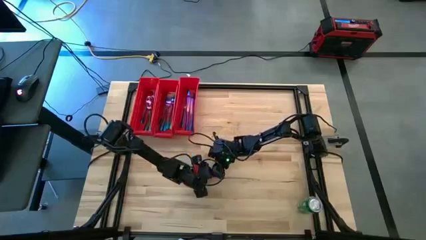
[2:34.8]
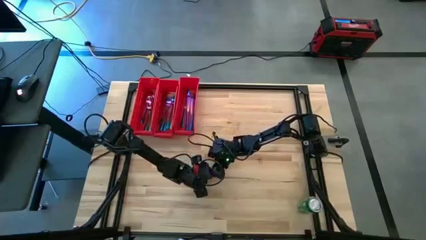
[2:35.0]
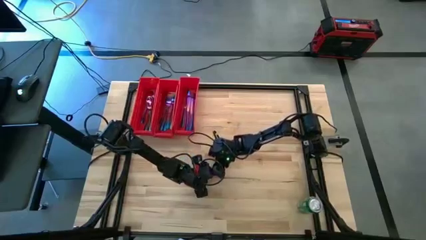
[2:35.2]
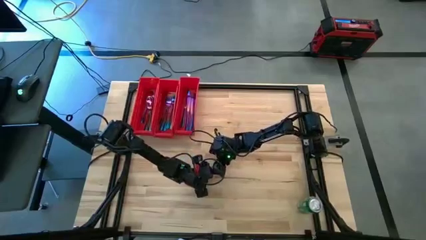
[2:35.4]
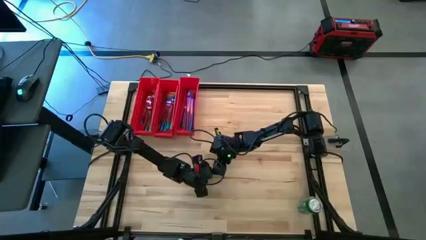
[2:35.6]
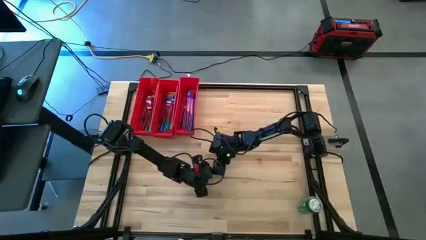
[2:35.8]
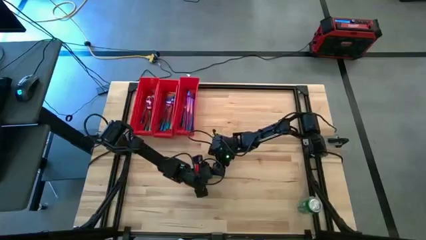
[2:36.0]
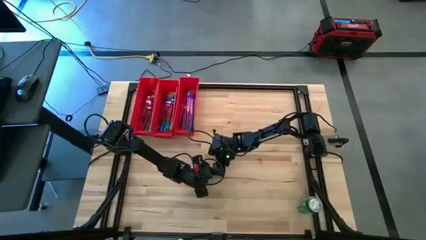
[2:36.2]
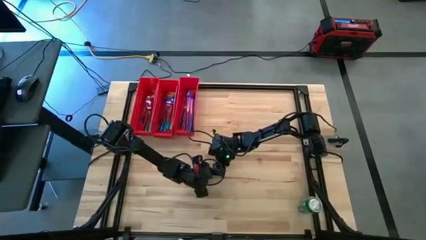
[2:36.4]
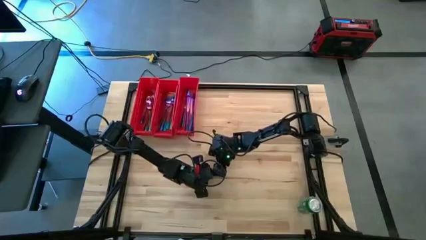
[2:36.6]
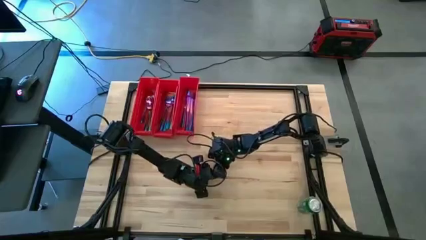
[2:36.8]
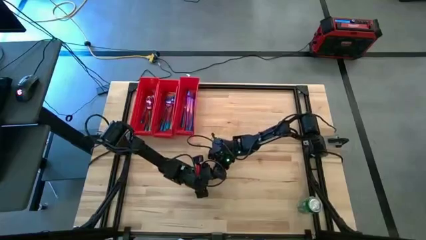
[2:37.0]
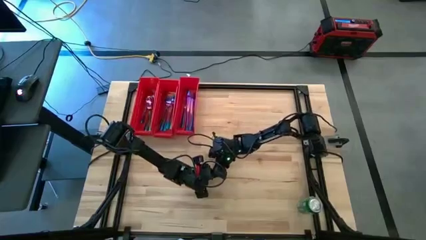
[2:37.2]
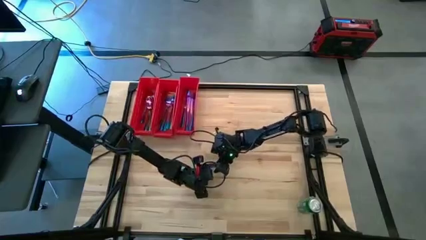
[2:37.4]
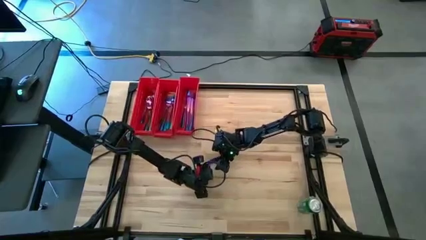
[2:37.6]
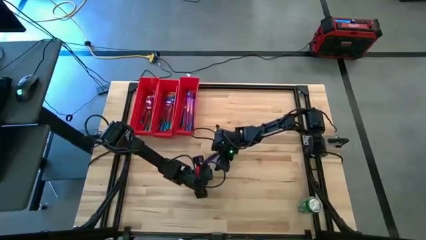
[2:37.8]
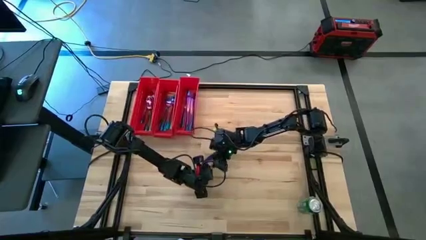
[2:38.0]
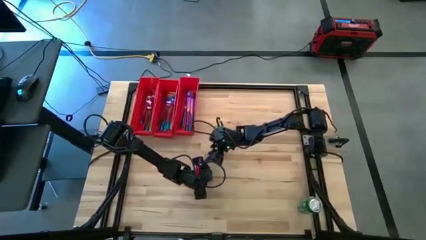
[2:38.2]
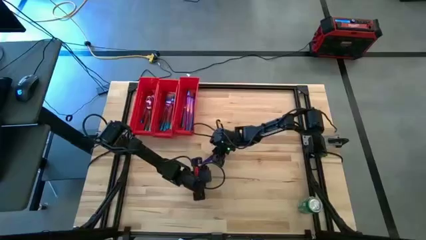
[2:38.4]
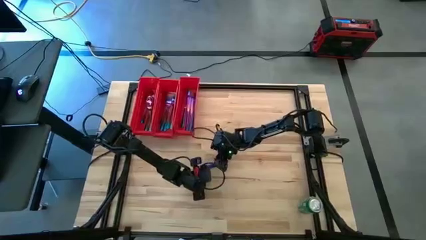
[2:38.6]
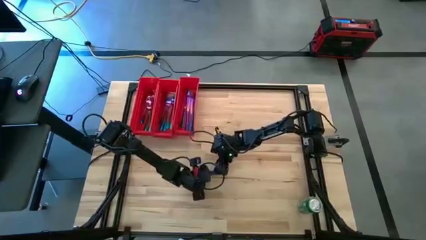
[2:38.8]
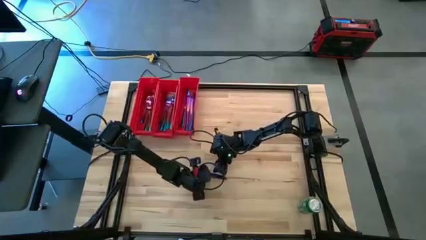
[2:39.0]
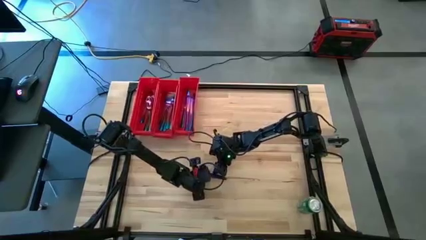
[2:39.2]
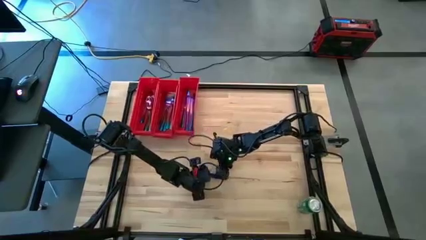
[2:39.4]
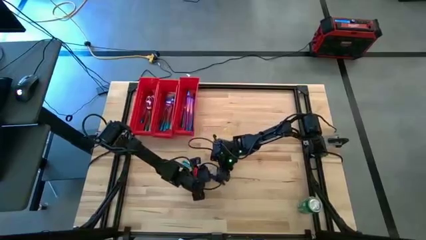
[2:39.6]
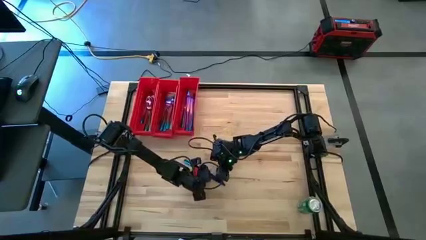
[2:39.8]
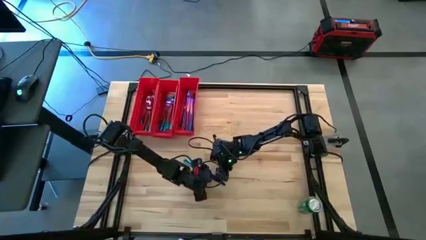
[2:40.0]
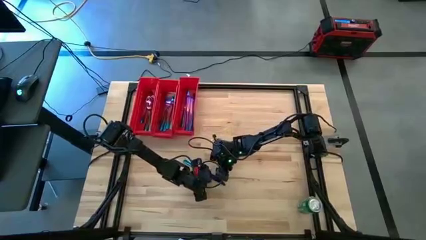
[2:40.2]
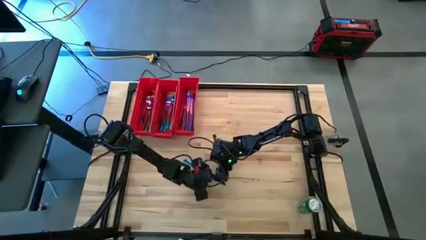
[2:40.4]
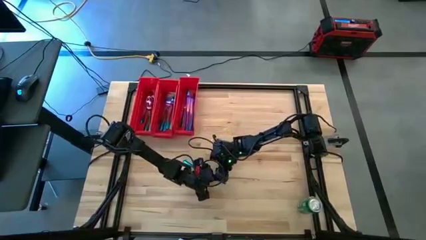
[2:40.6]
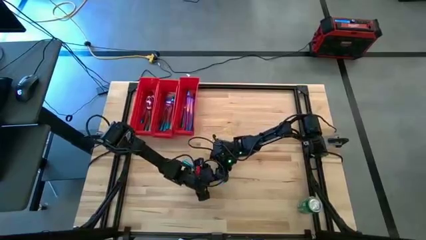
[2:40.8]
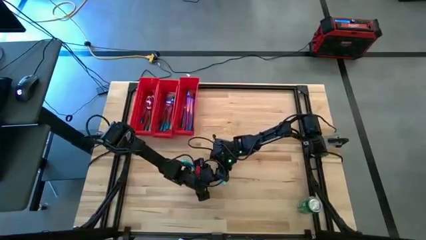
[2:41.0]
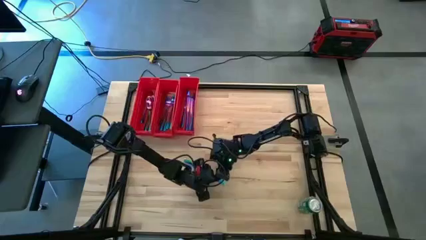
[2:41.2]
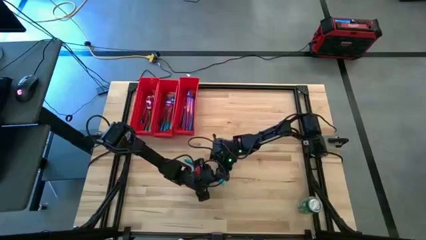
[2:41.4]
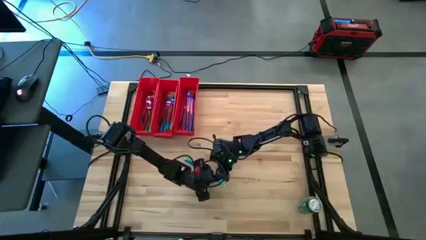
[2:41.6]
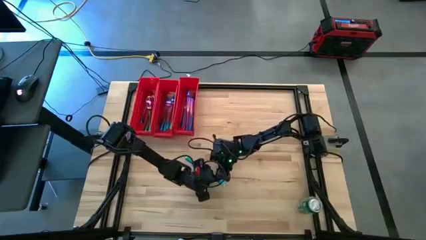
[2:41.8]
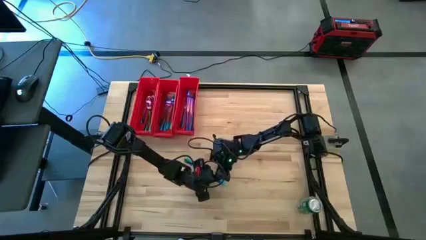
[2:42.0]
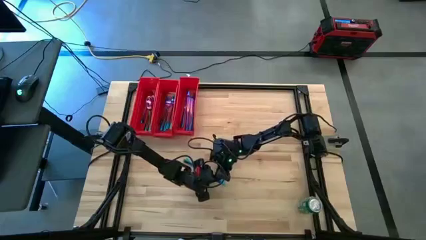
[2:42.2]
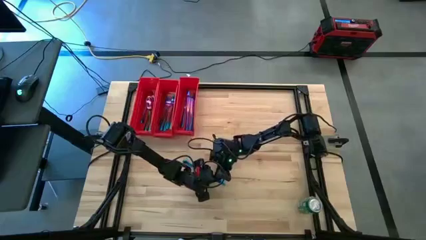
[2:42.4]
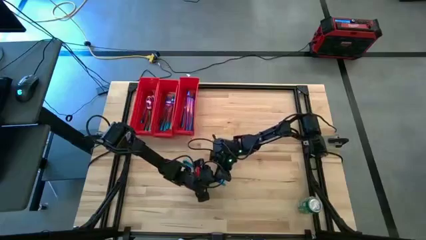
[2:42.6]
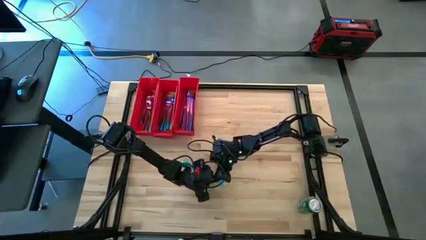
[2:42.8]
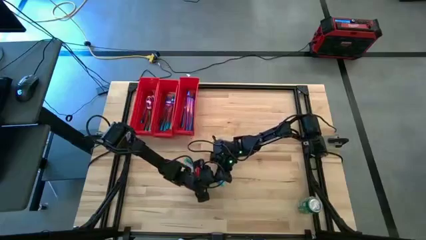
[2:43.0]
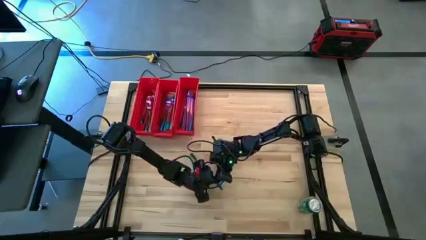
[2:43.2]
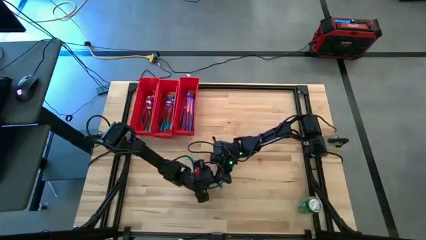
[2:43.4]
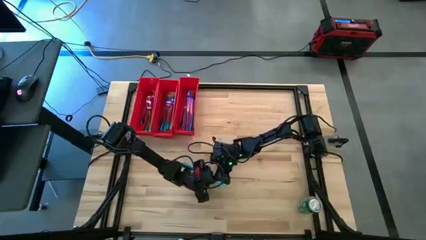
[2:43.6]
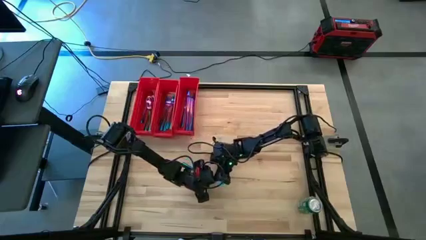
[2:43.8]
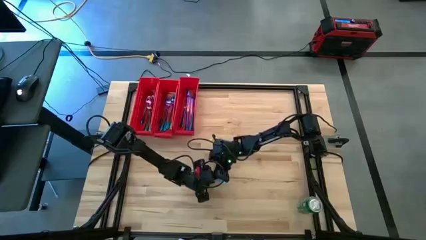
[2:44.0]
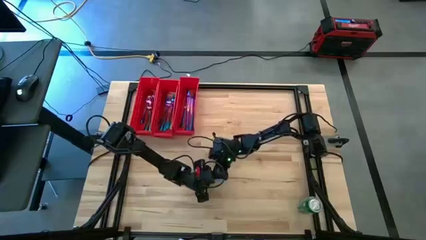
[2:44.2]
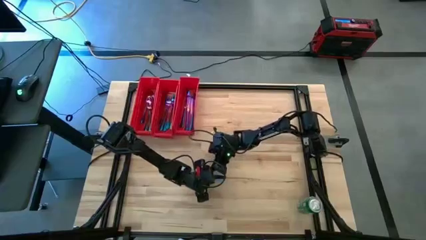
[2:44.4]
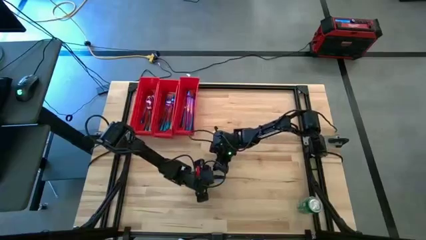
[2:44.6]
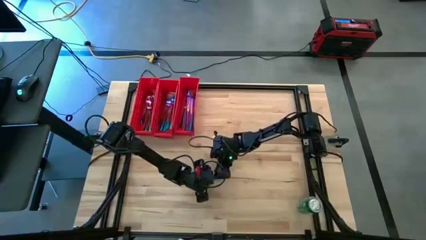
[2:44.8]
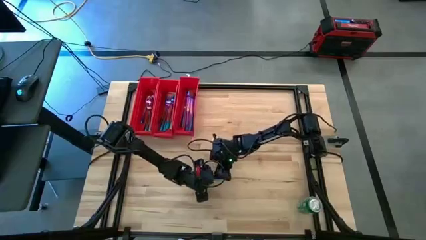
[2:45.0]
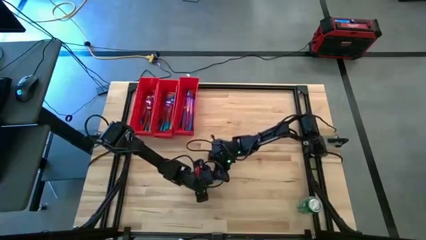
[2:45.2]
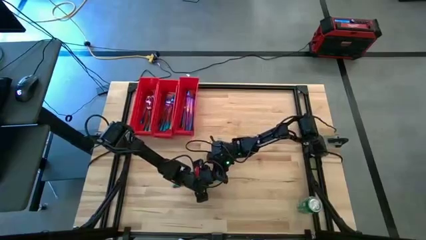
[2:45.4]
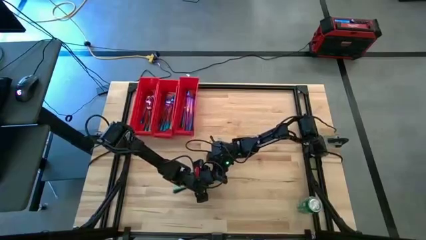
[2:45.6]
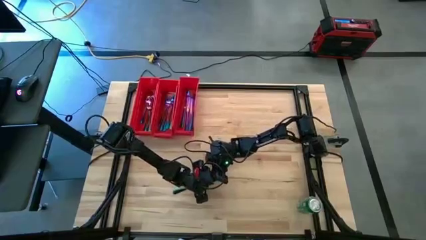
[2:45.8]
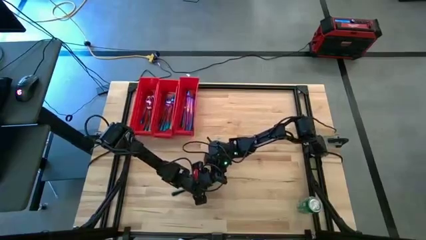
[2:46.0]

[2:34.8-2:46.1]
Task: Sort silverware
Put the blue knife into the right red bin

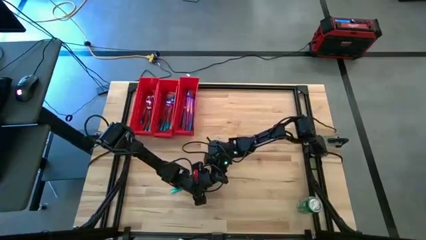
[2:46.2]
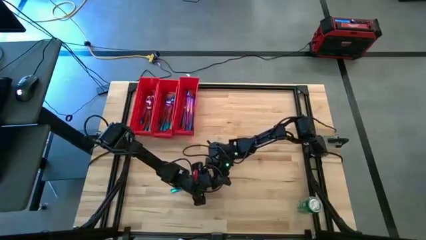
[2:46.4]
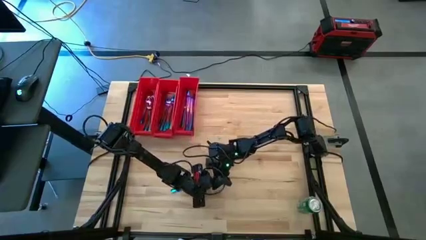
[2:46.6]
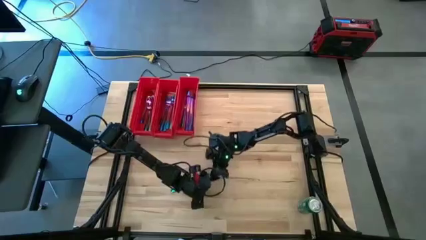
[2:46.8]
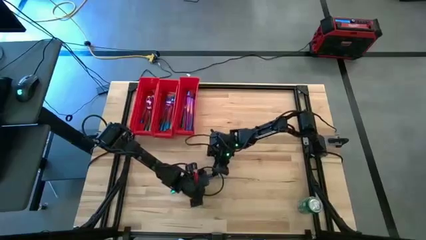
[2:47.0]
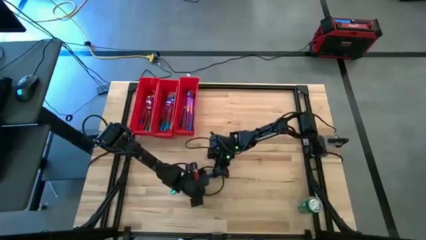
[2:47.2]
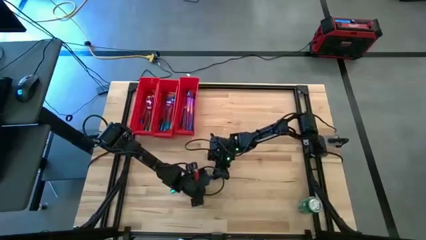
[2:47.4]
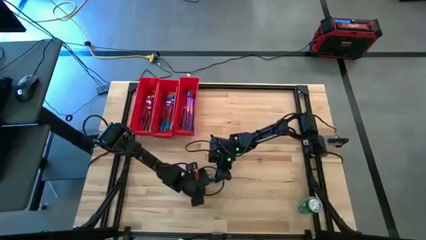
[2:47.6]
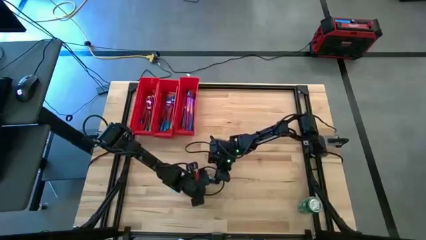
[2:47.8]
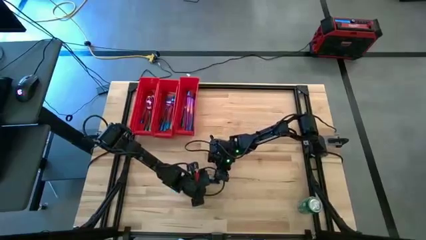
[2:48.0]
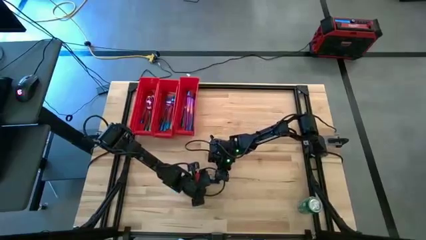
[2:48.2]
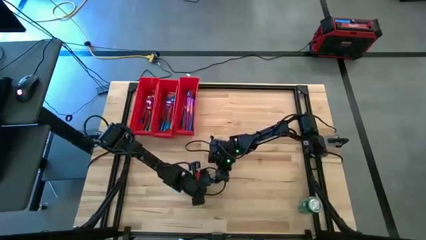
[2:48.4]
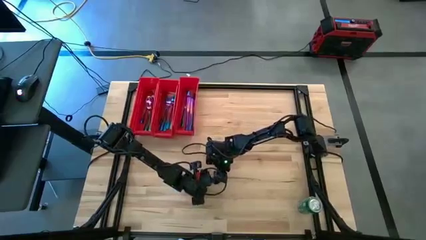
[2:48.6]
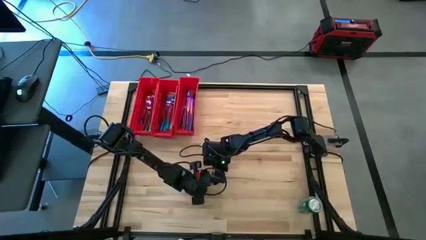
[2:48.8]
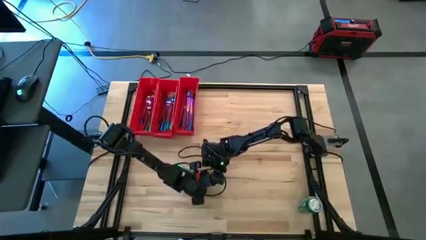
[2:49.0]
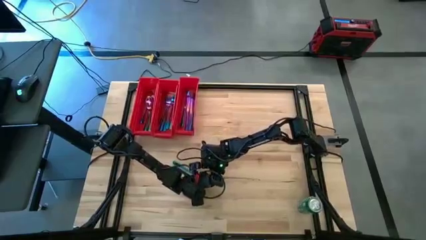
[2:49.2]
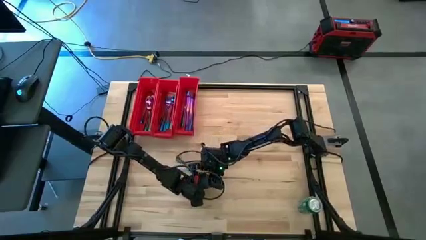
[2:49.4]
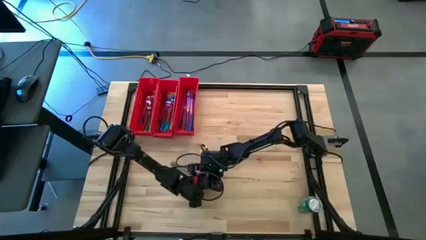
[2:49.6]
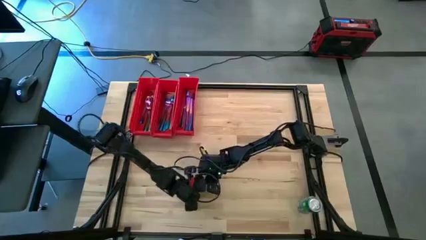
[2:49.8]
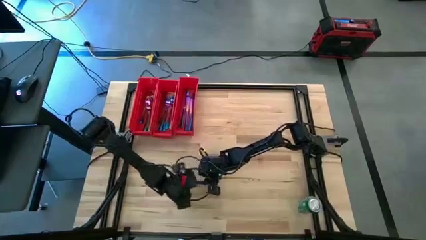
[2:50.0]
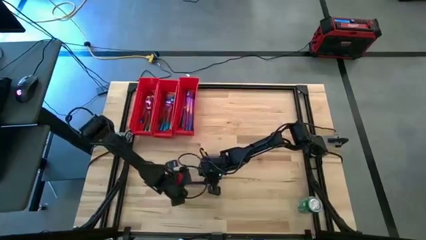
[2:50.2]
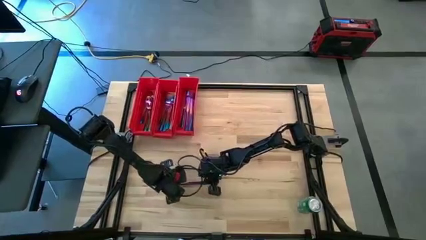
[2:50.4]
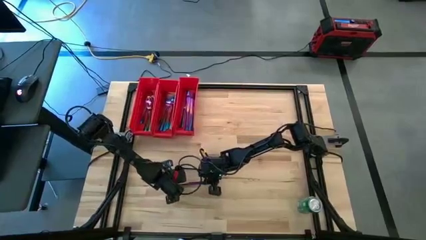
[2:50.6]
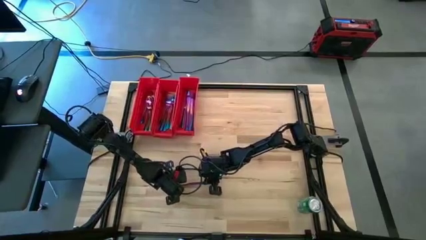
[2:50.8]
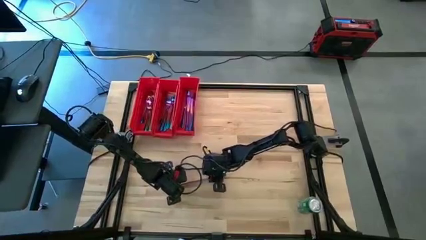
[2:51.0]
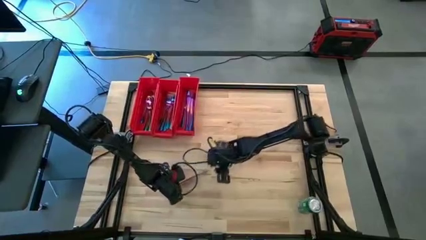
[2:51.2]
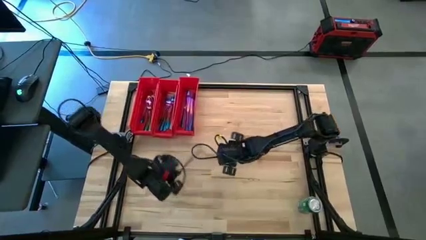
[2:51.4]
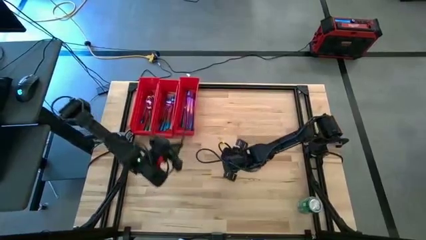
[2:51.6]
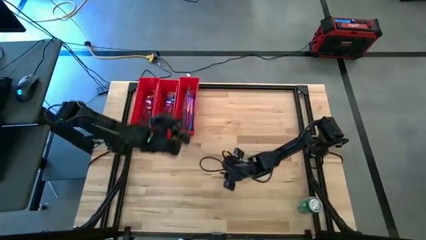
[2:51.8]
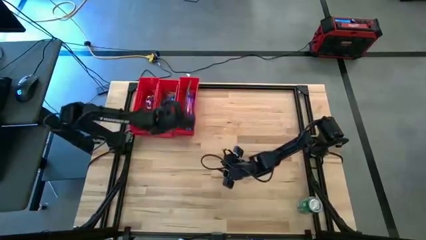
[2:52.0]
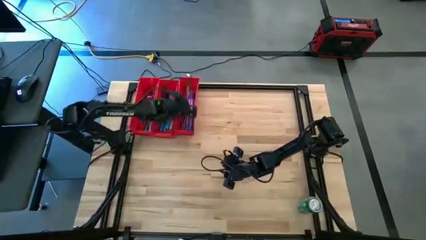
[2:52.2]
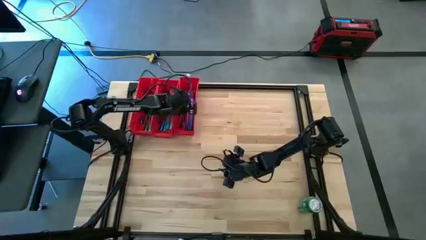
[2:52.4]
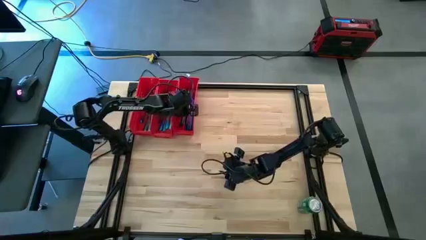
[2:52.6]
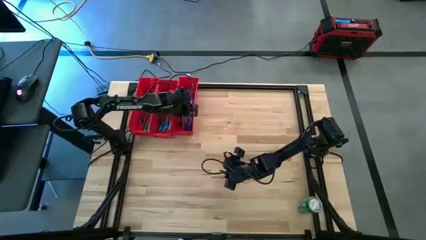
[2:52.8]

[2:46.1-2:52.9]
Put the blue knife into the right red bin
